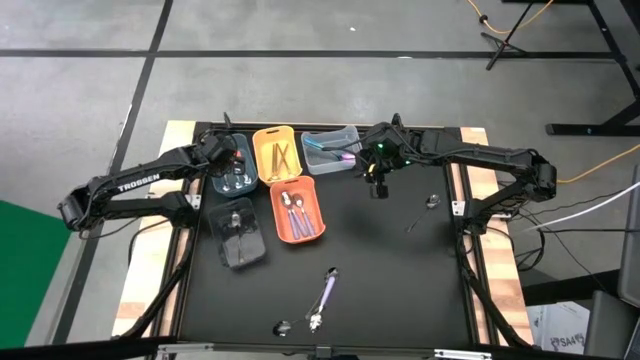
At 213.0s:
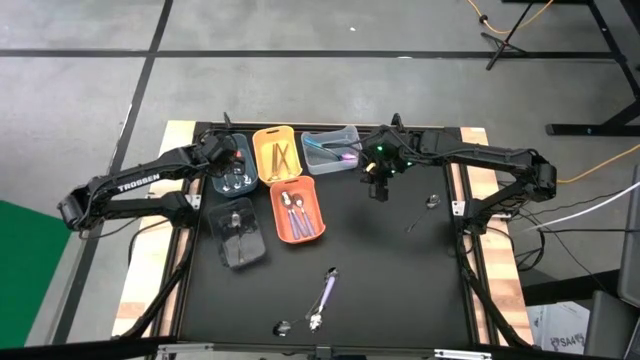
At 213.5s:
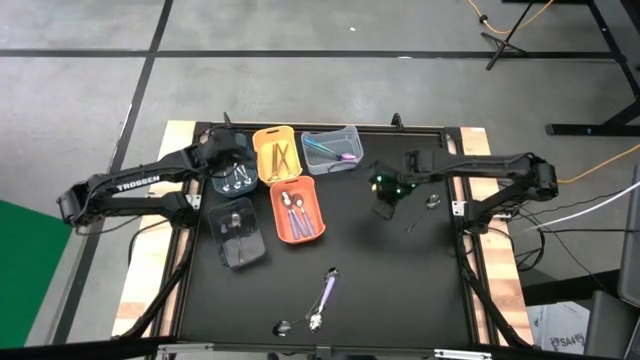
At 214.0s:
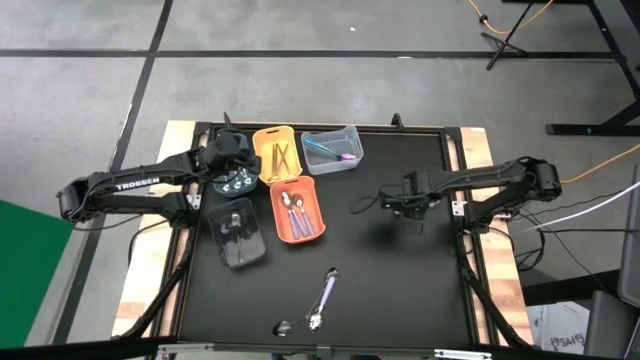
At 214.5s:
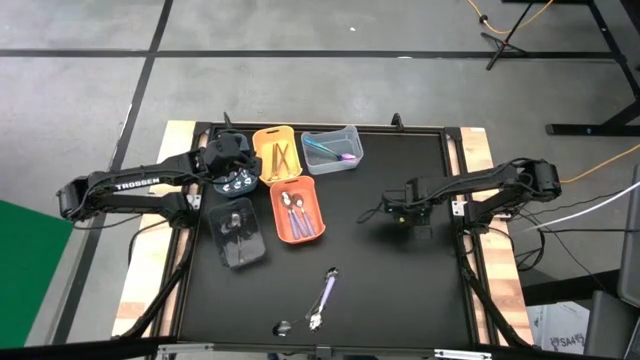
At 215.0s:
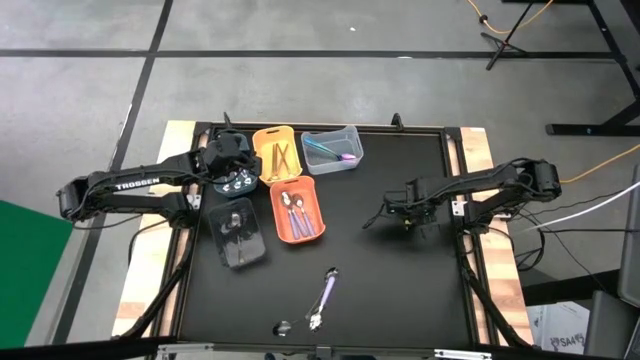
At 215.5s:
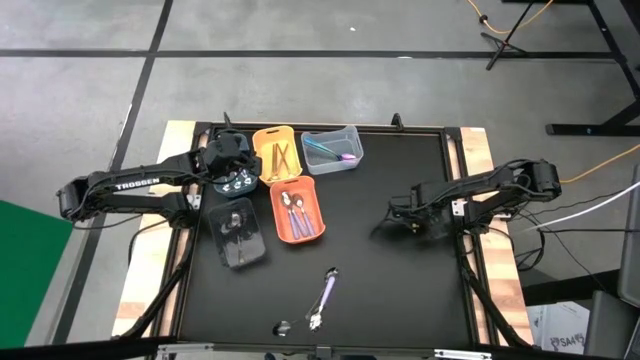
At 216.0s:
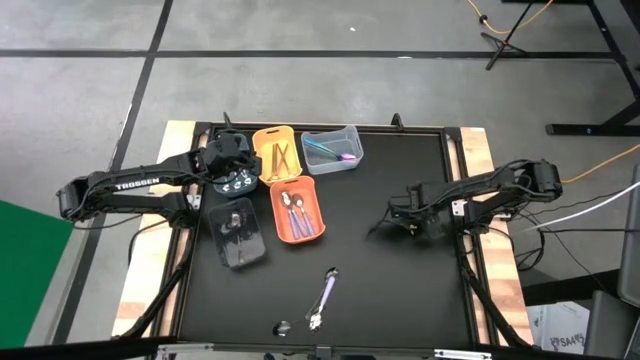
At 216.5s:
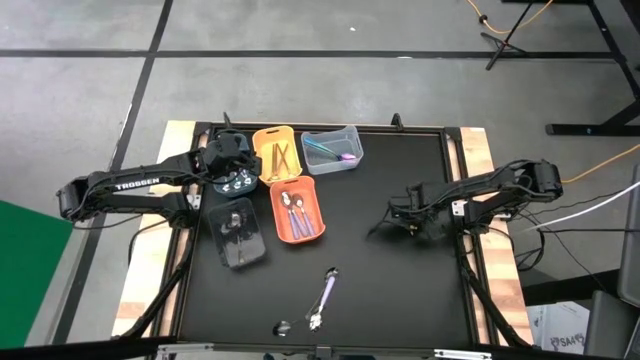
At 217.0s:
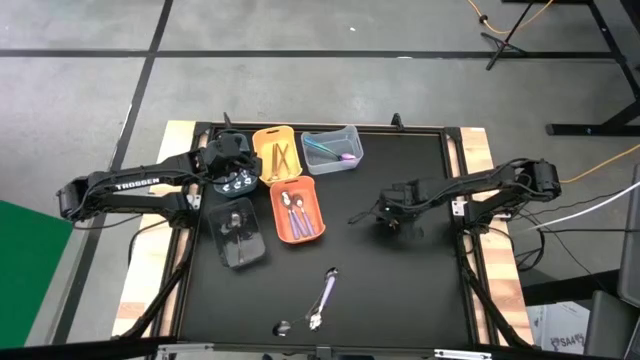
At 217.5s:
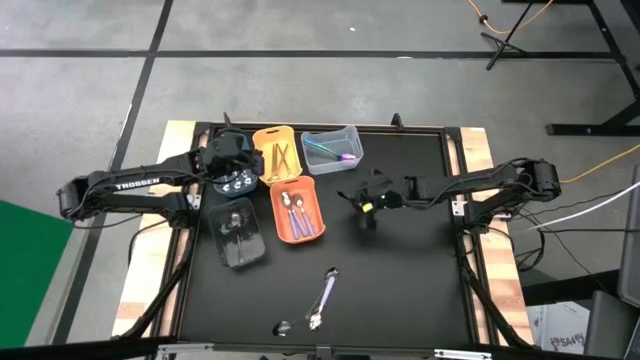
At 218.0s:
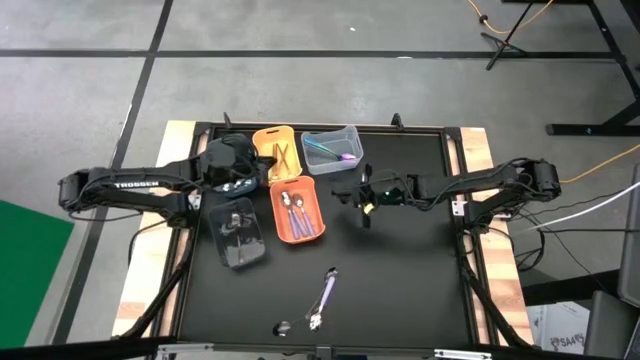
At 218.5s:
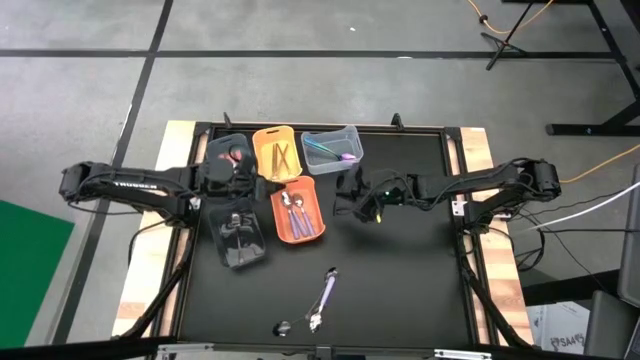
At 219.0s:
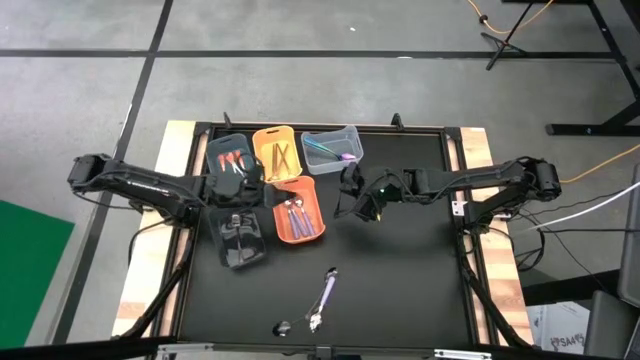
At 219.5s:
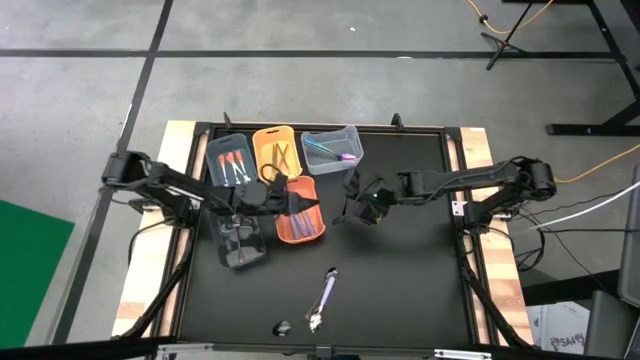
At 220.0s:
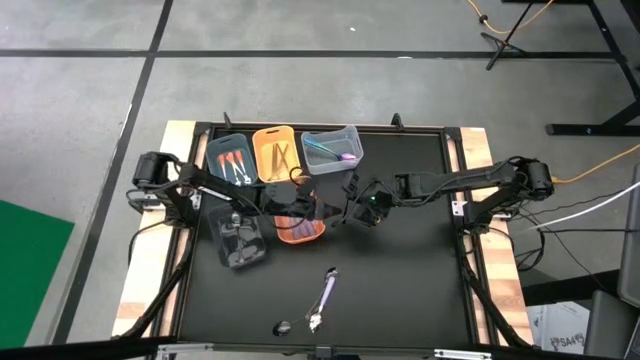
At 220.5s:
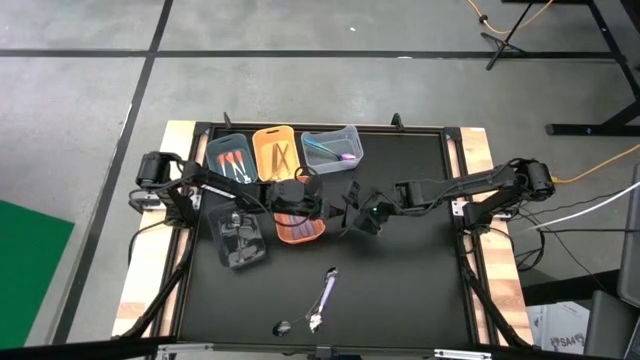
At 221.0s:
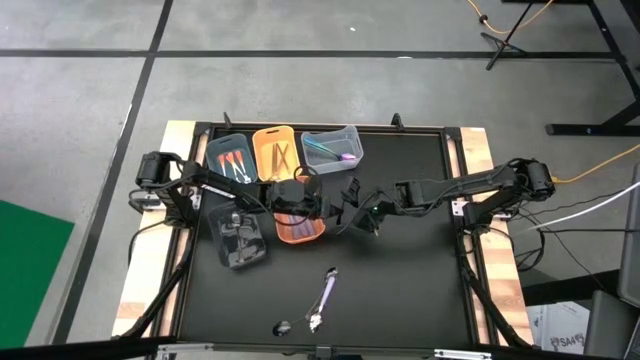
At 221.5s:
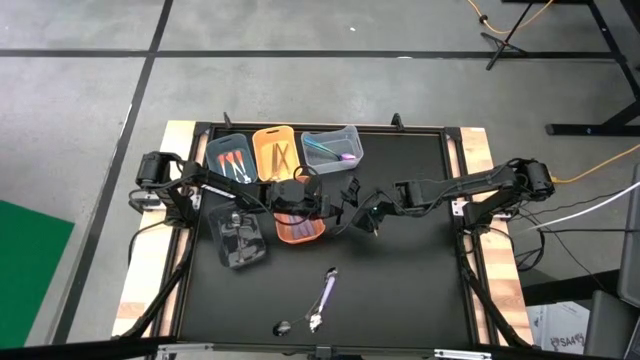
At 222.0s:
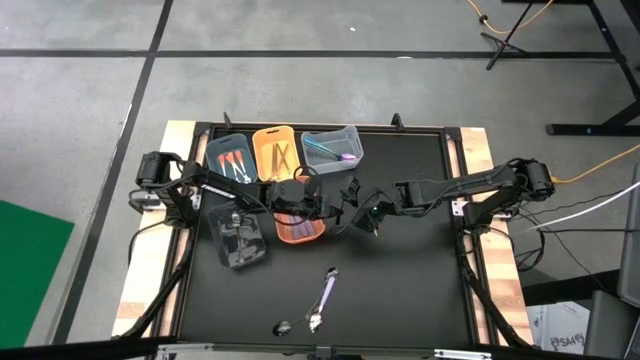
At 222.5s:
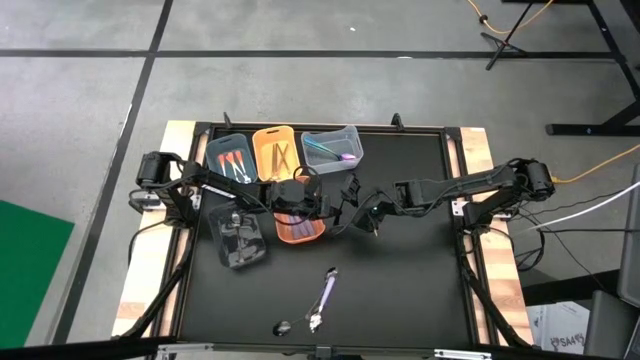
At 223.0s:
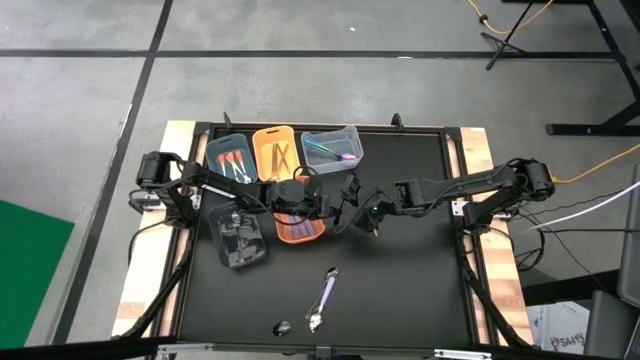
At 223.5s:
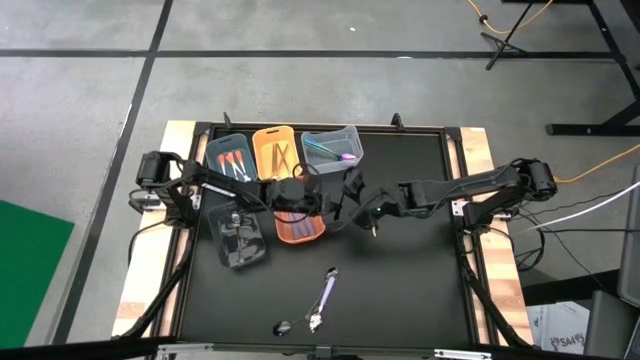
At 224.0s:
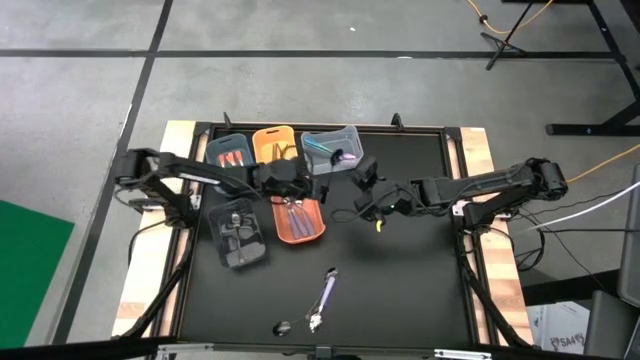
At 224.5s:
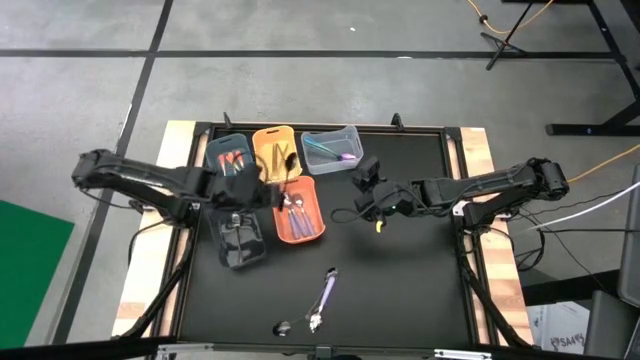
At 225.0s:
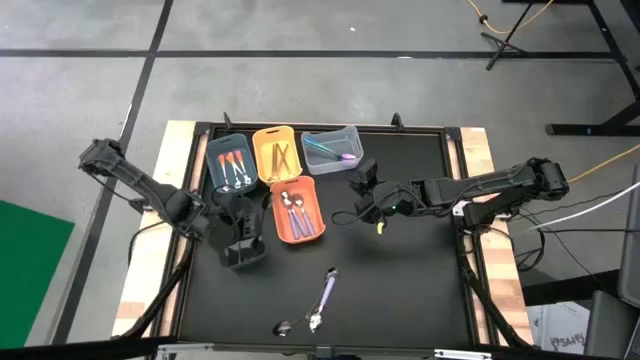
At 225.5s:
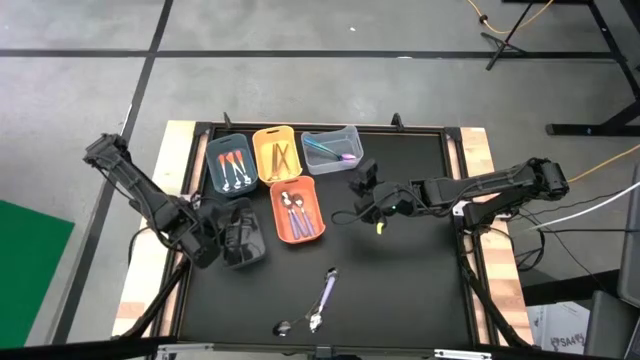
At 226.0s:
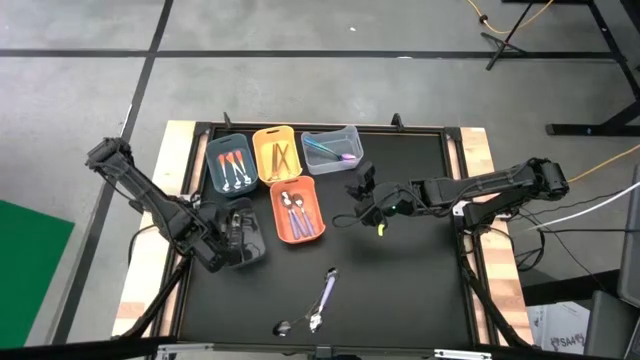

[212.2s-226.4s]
Task: Sort silverware by color (type)
Put the black spoon into the black bin

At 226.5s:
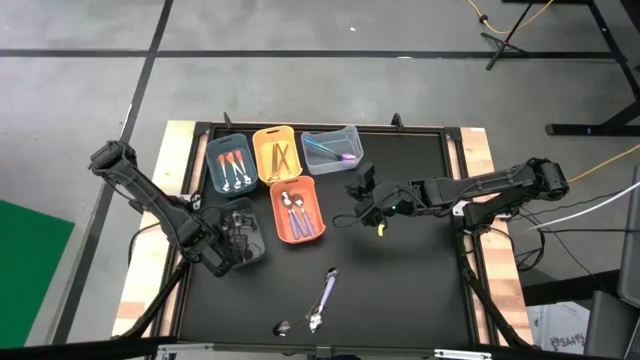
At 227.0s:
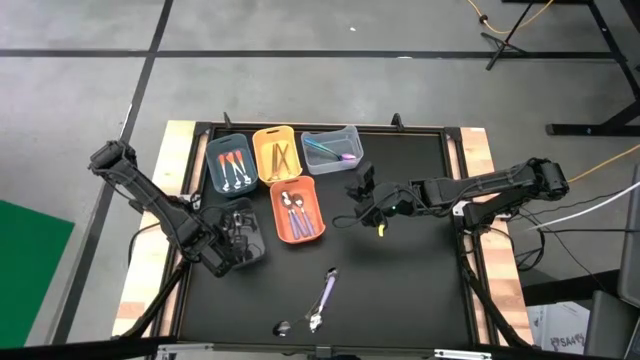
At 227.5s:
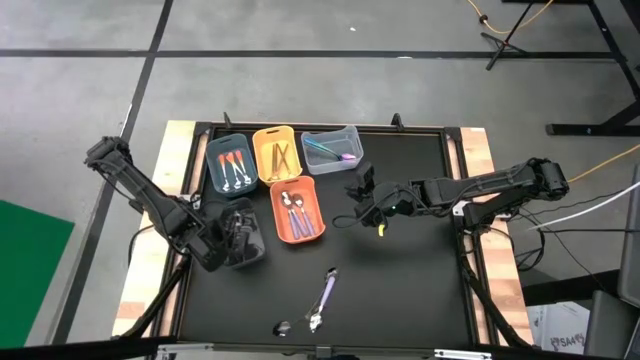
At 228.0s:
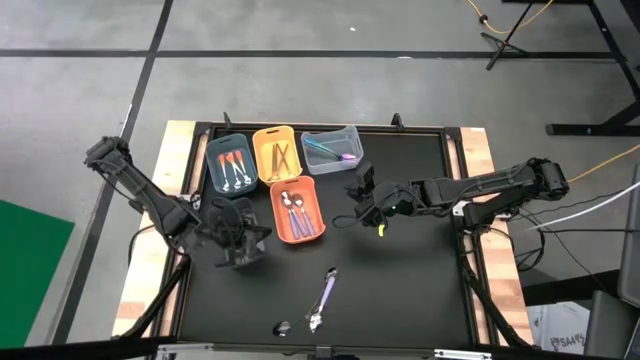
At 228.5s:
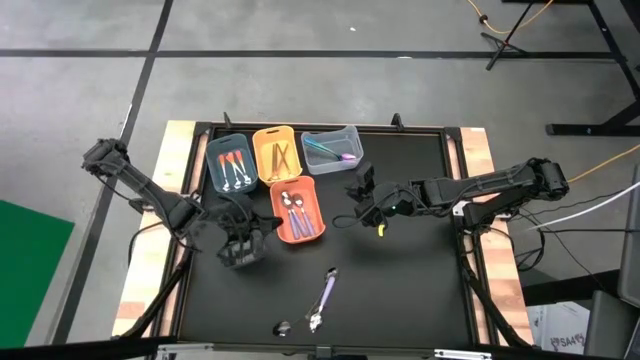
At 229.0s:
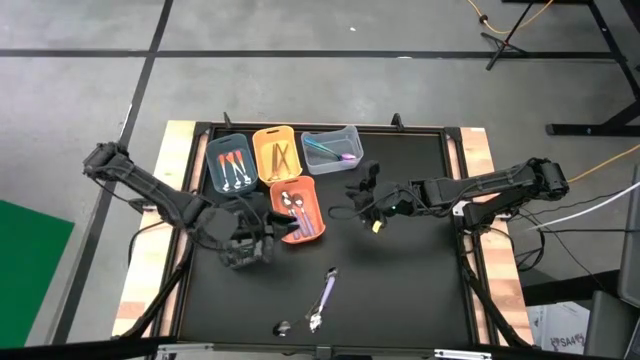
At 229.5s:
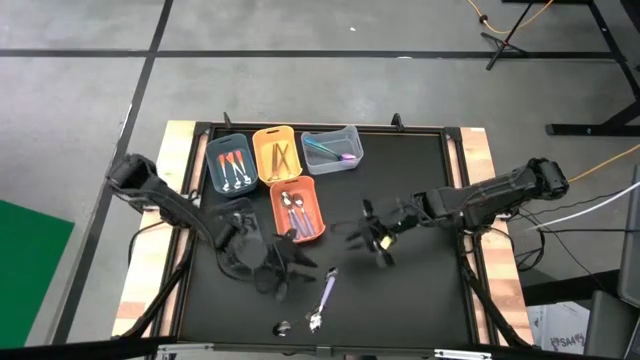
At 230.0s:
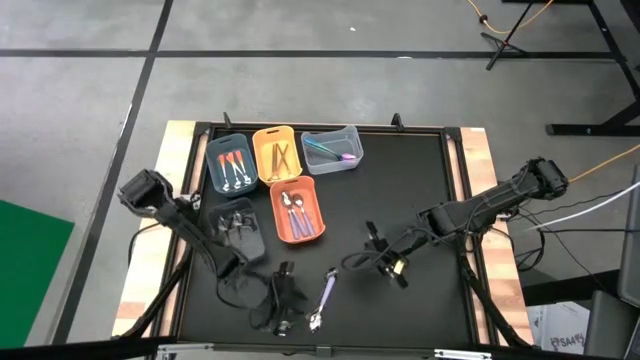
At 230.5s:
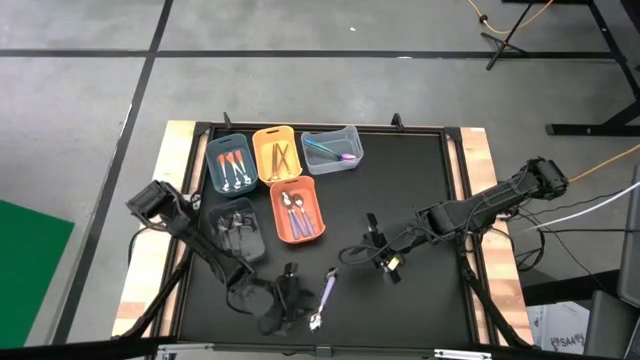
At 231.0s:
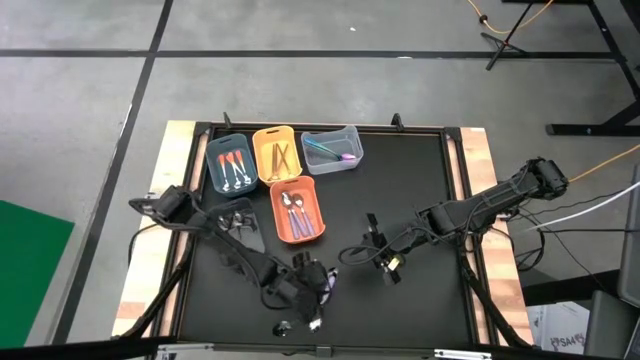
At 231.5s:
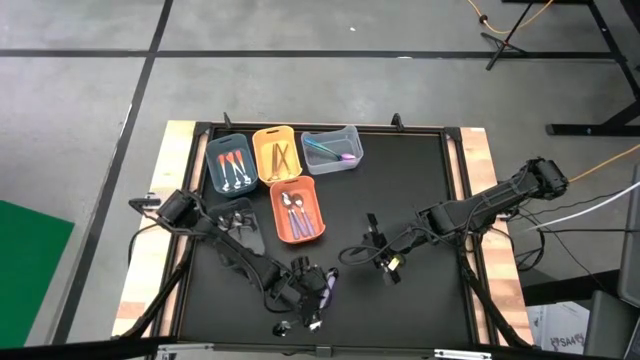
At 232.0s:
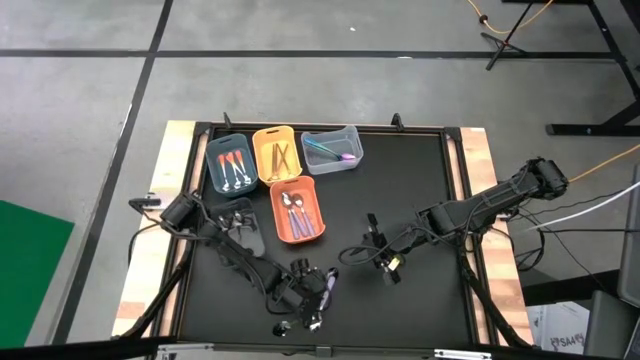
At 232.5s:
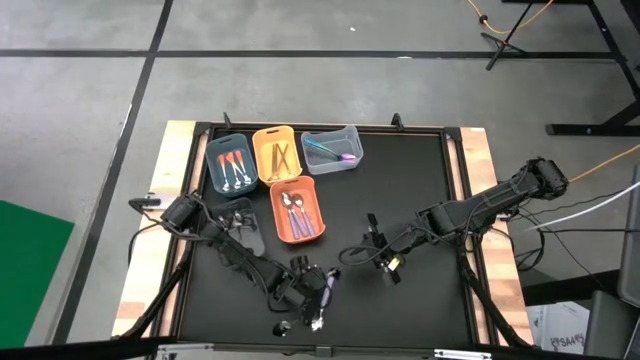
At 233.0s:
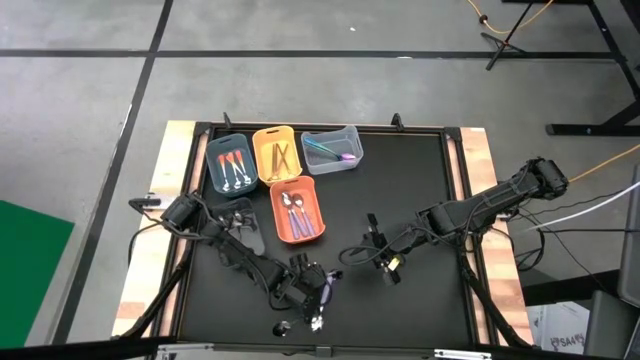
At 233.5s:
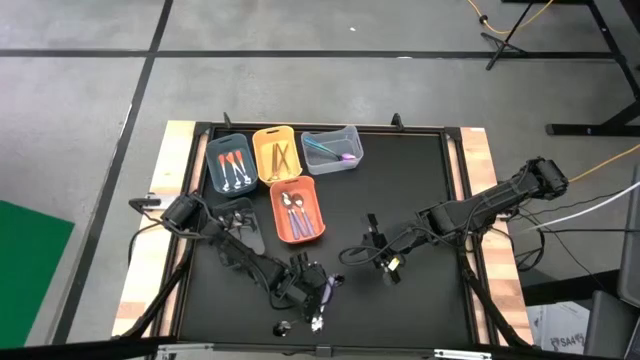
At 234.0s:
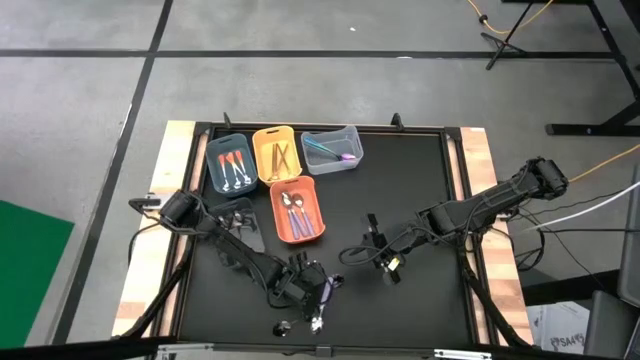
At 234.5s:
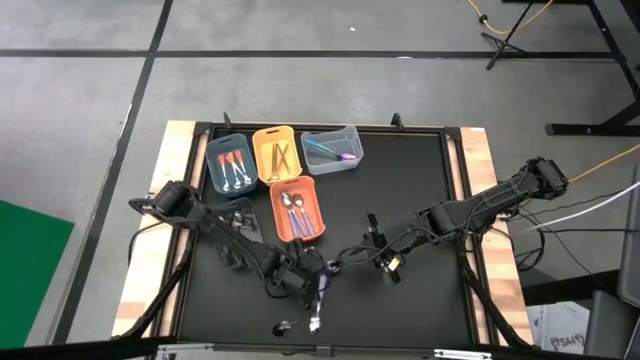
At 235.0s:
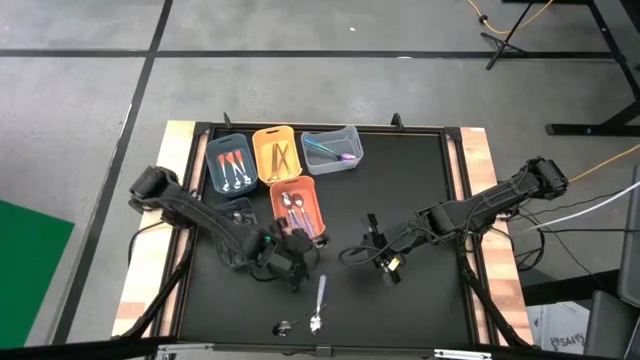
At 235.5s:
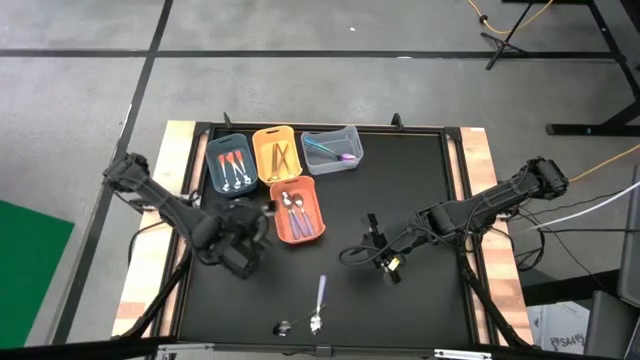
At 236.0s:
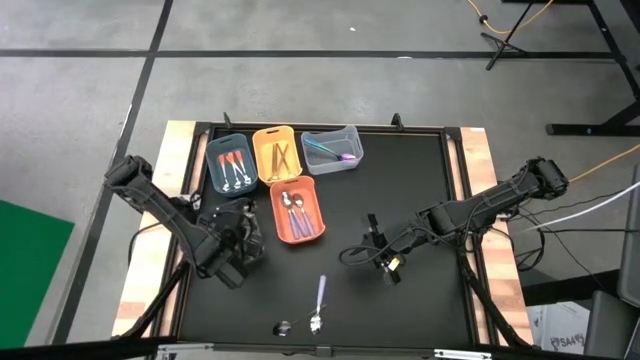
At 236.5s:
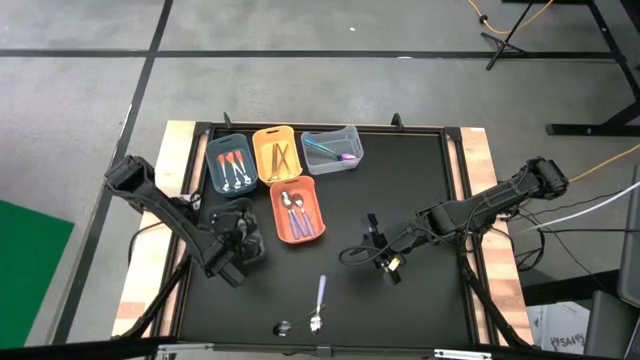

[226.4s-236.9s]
Put the black spoon into the black bin
